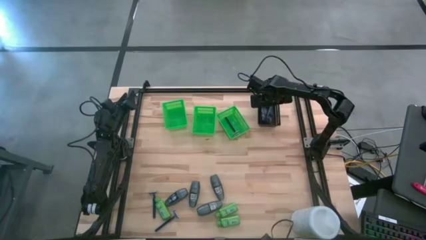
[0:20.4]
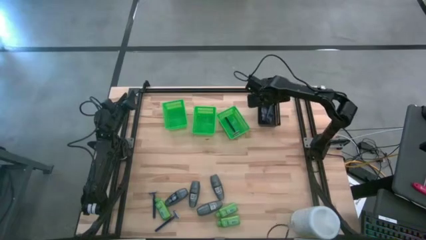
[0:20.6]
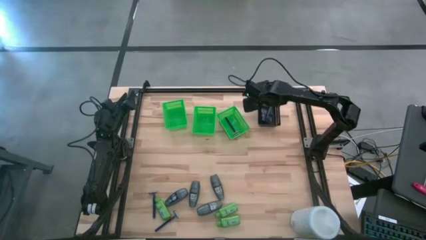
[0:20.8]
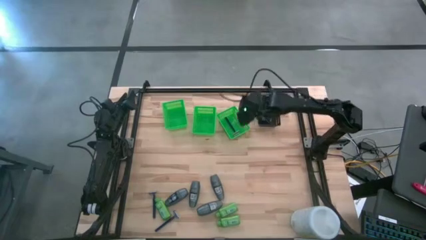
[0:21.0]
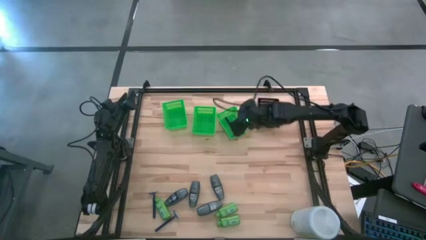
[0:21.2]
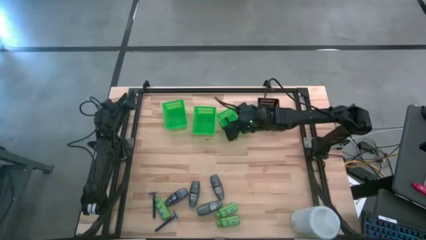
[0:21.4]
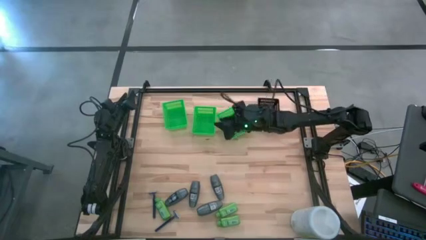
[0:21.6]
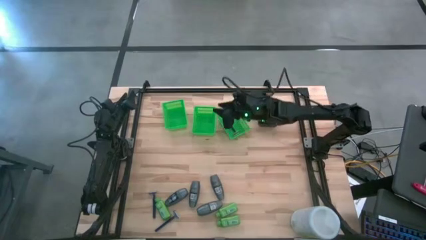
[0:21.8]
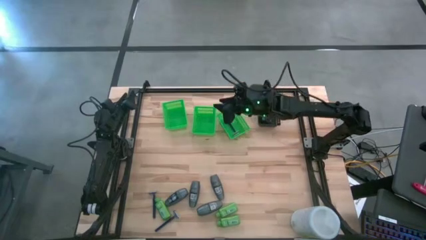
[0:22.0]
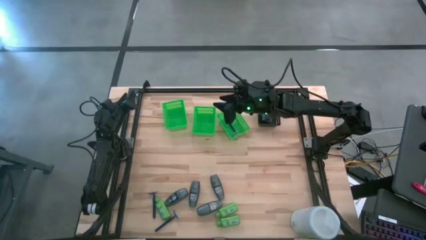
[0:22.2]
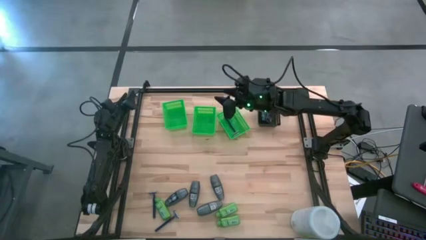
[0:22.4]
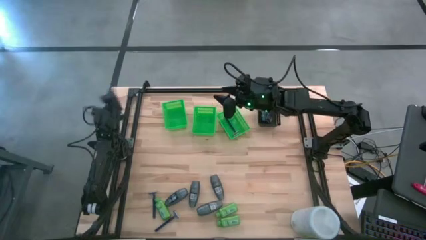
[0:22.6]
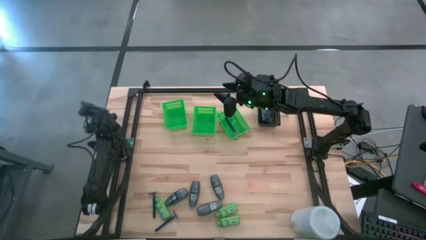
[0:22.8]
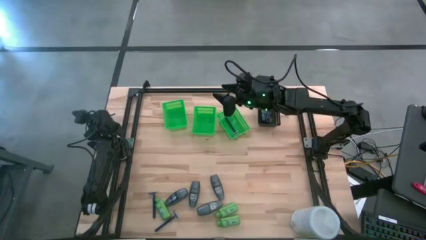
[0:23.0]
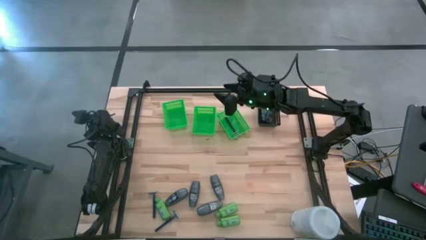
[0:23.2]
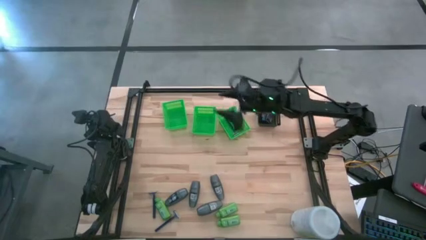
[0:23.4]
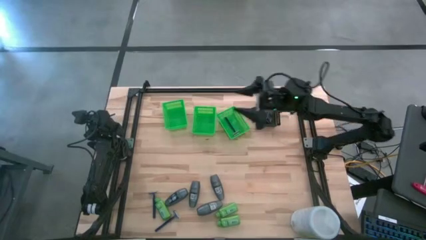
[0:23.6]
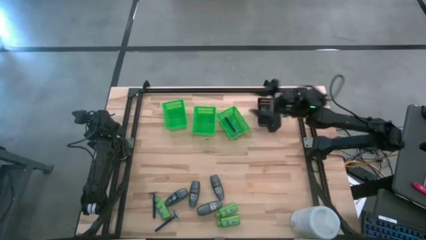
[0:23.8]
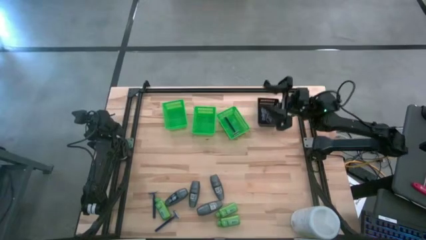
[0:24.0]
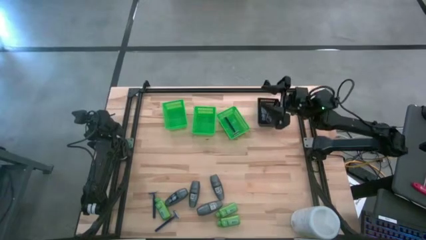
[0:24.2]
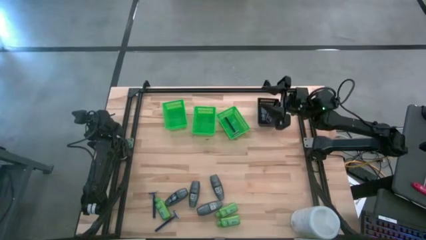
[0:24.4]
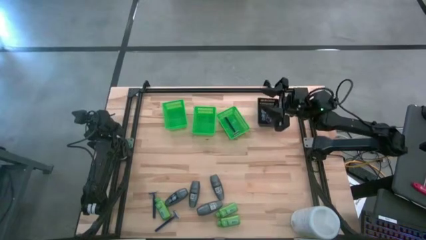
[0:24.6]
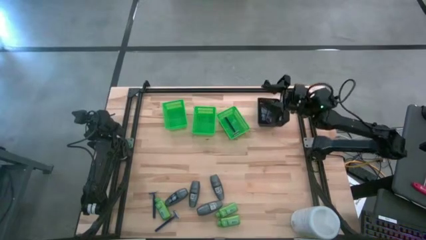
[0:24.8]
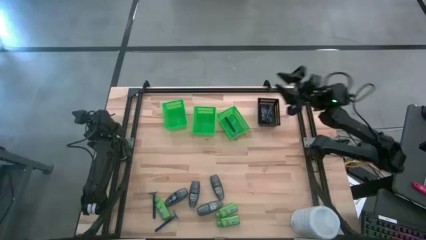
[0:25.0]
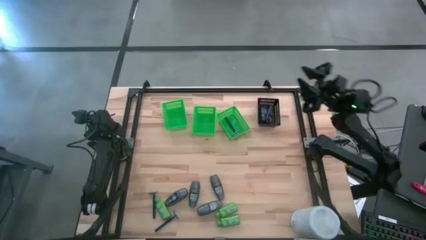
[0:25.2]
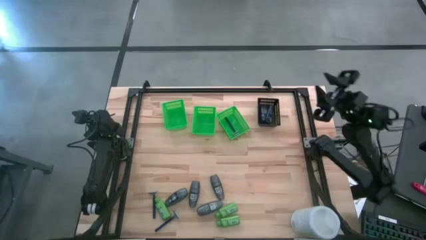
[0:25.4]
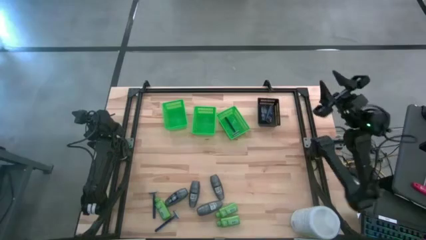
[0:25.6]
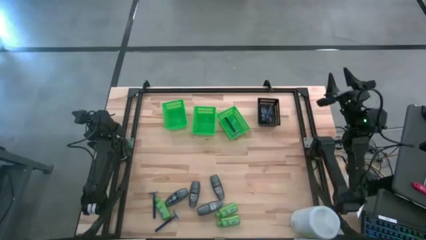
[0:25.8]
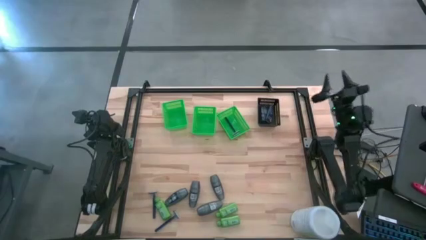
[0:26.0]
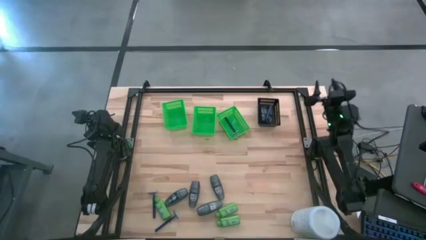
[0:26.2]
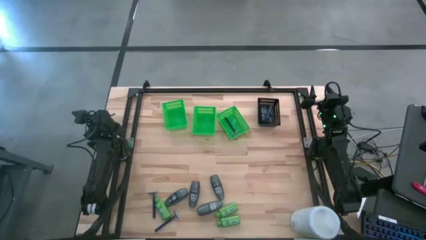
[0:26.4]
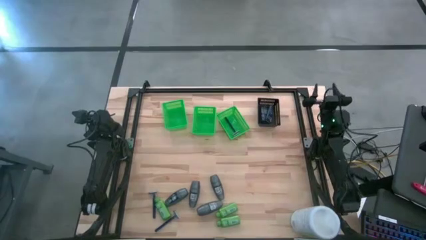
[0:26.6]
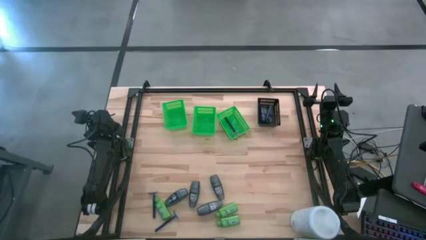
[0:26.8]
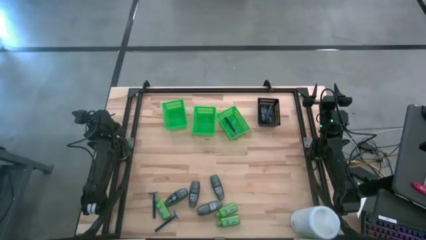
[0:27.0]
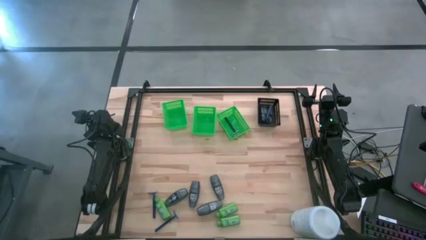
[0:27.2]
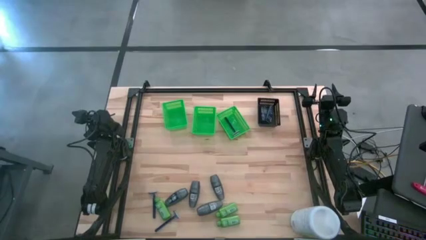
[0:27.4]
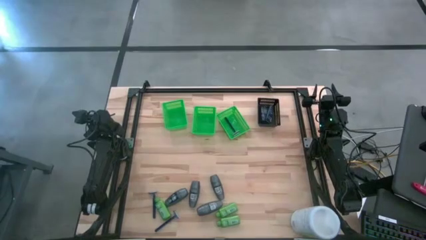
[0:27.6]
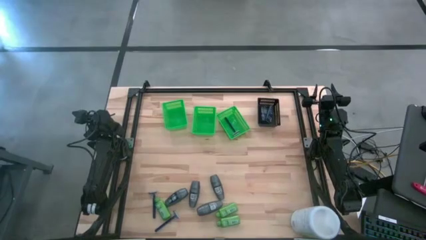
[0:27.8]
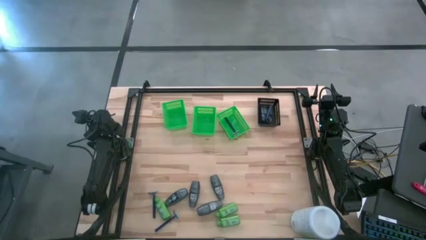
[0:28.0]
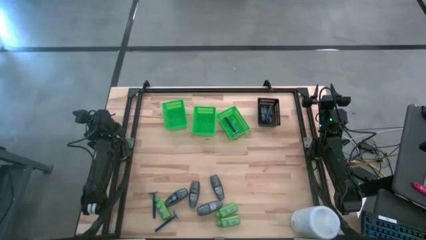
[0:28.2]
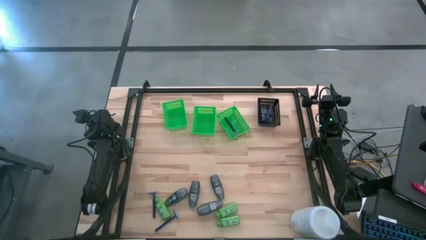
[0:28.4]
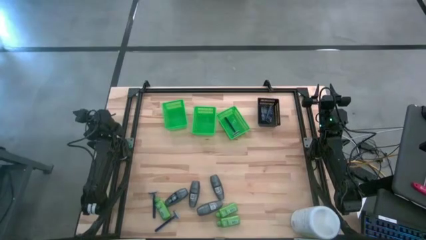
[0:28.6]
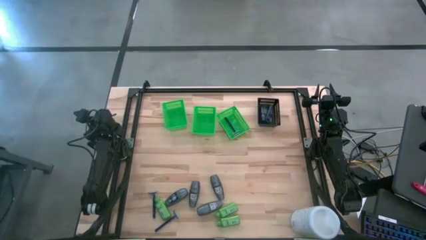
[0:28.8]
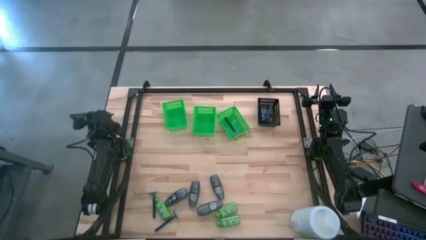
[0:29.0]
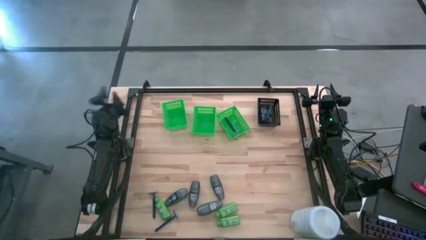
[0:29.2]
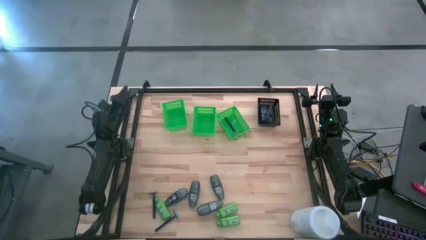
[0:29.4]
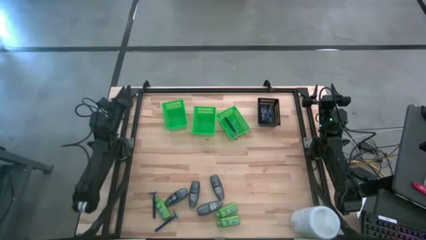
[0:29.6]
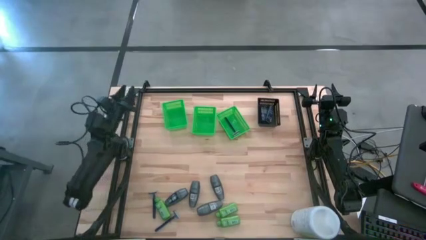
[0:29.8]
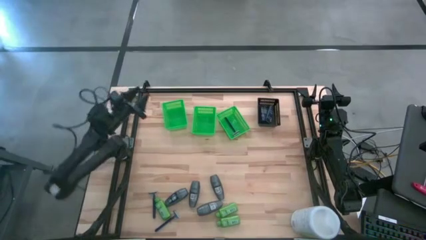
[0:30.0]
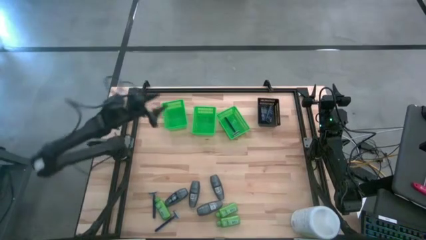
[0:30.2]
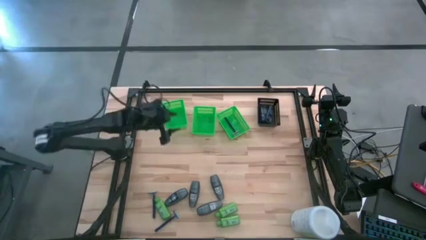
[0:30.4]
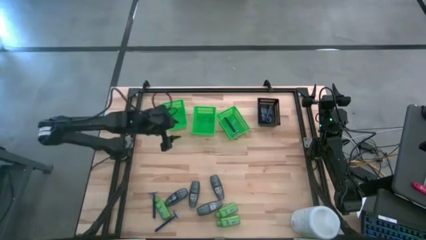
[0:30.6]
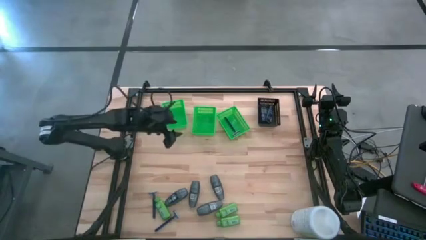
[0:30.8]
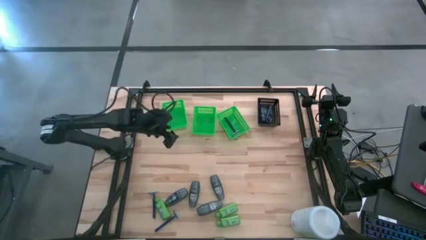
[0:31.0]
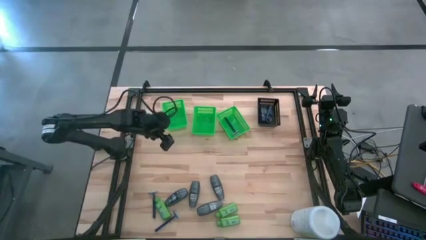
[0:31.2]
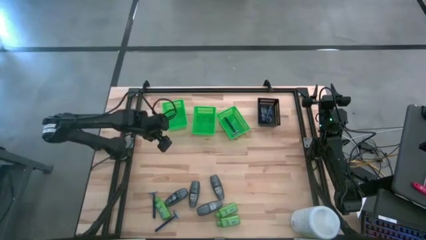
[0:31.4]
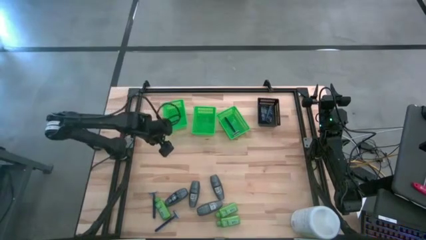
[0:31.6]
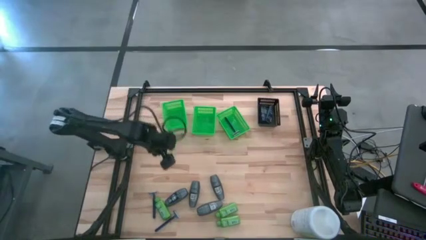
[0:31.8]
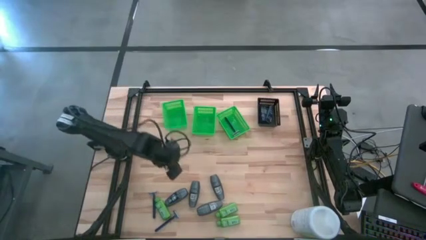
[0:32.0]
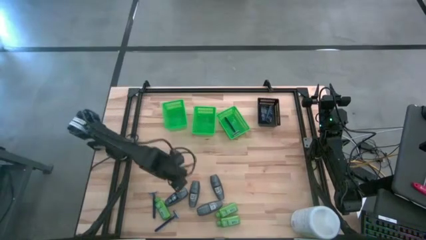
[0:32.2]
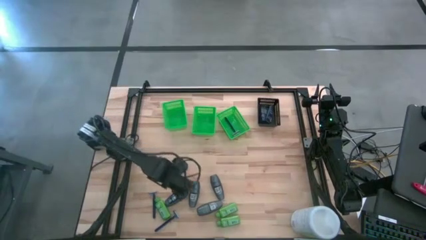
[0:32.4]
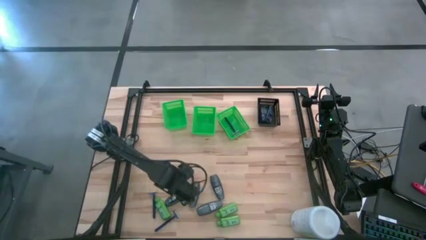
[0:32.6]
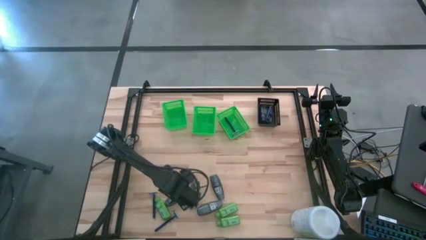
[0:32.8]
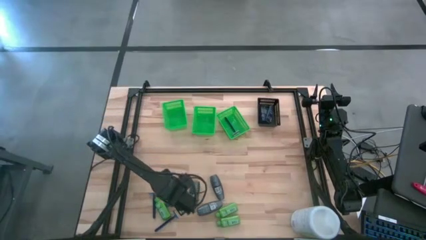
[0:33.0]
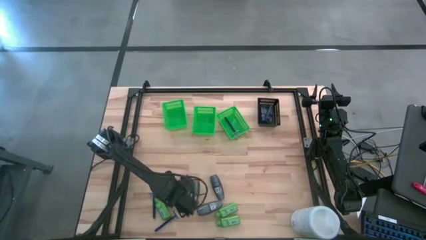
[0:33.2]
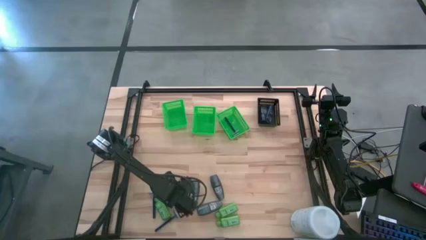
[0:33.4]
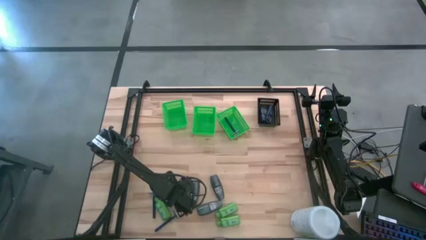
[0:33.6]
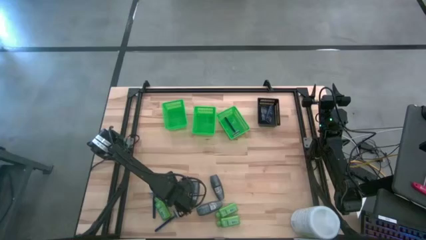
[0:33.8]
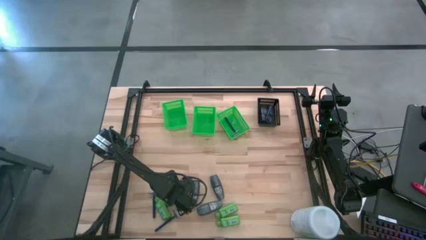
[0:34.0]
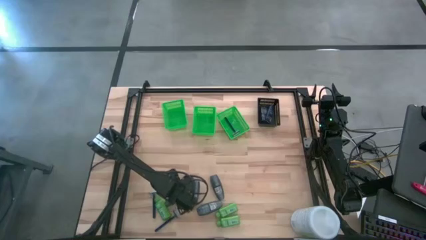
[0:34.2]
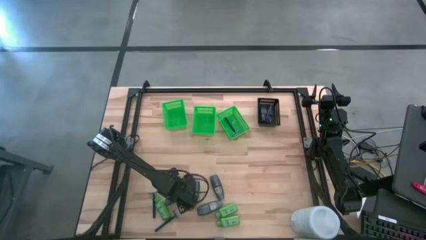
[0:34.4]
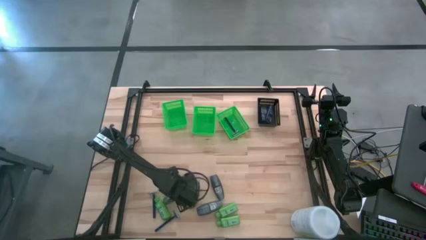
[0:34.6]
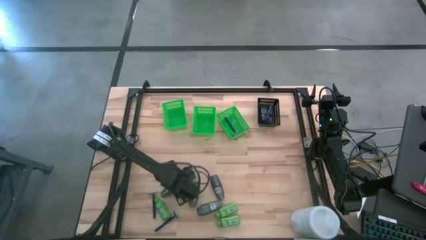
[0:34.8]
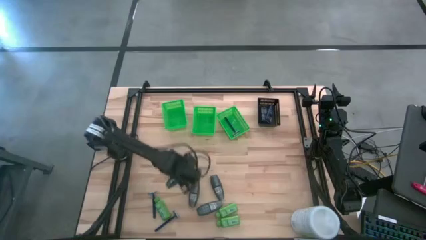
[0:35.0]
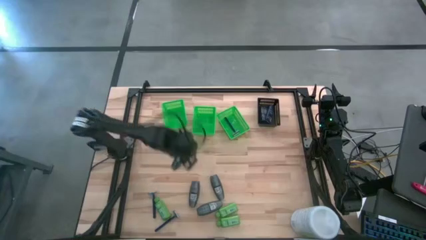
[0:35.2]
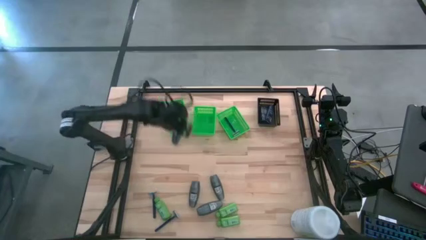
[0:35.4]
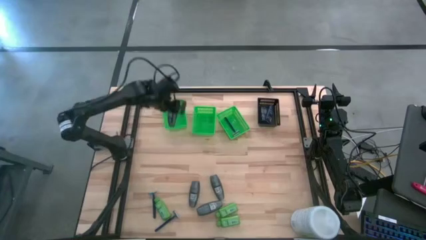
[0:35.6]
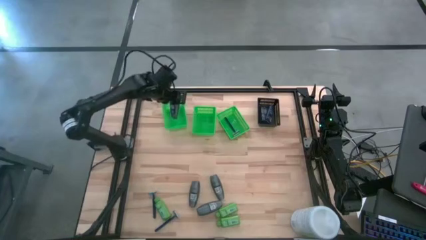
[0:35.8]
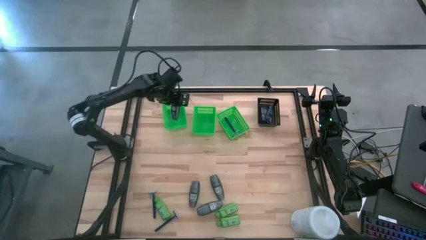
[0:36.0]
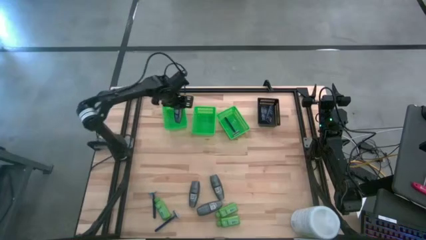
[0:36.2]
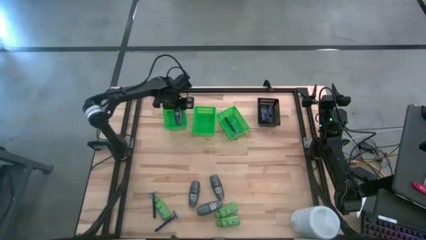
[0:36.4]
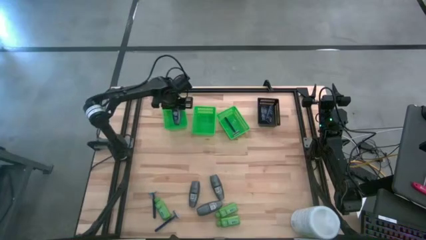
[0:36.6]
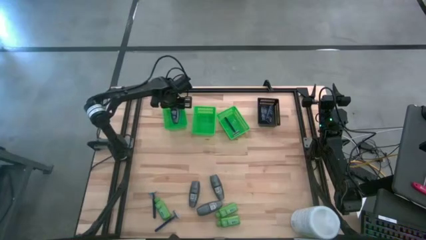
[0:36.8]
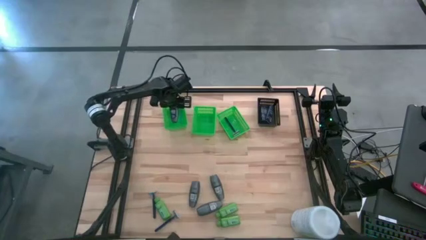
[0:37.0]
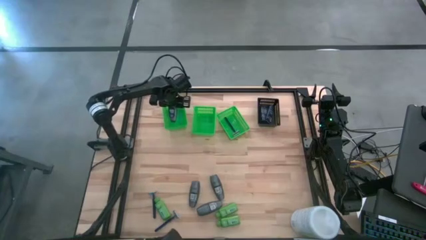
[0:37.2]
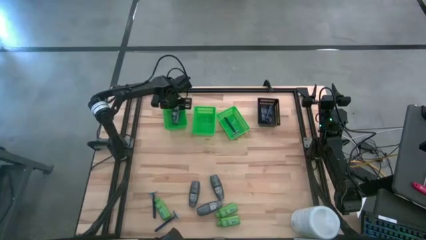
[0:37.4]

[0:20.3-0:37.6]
Task: Pick & Place Travel size toiletries
Put the deodorant into the left green bin
